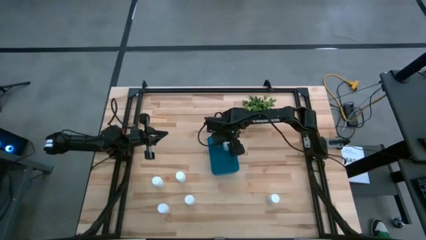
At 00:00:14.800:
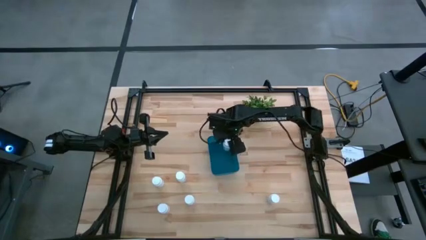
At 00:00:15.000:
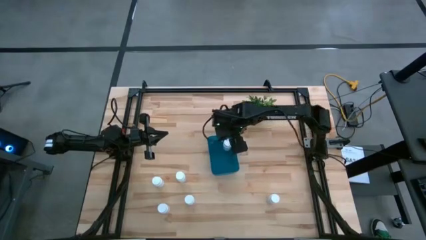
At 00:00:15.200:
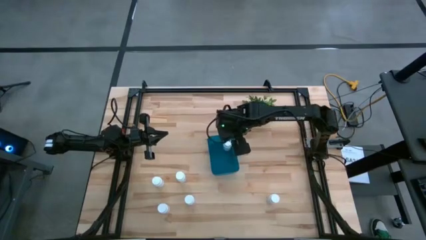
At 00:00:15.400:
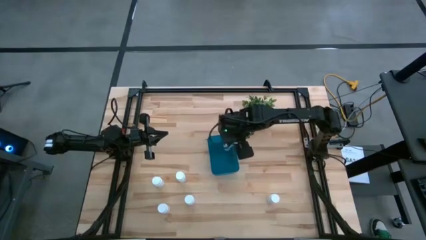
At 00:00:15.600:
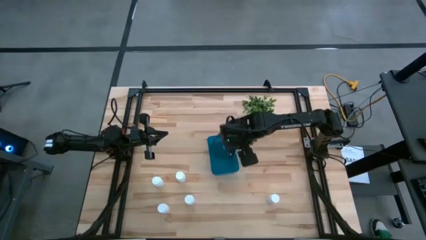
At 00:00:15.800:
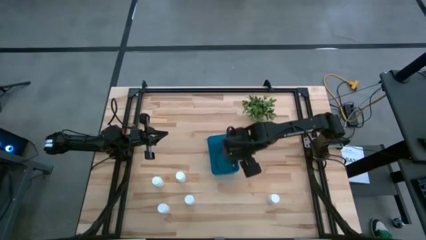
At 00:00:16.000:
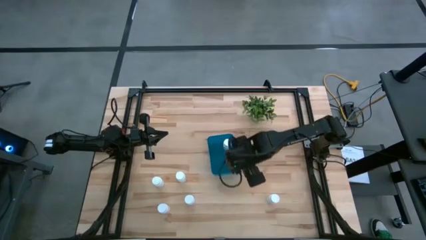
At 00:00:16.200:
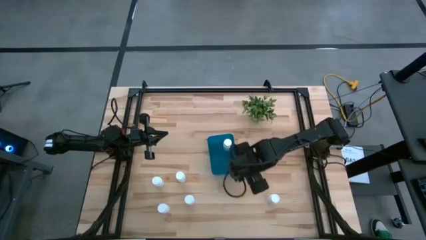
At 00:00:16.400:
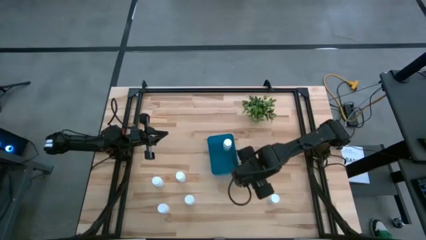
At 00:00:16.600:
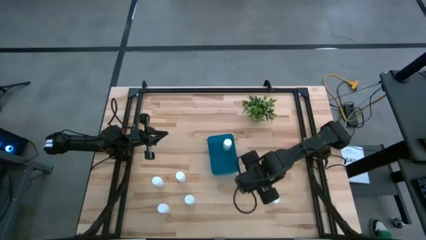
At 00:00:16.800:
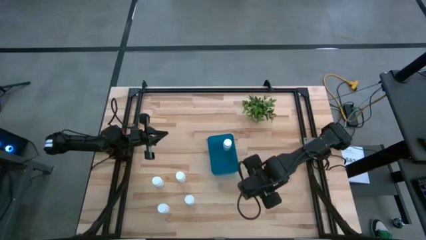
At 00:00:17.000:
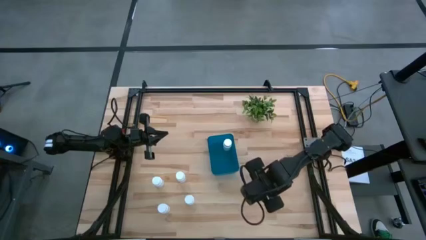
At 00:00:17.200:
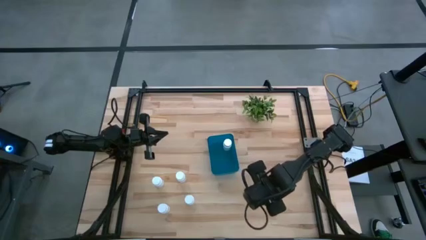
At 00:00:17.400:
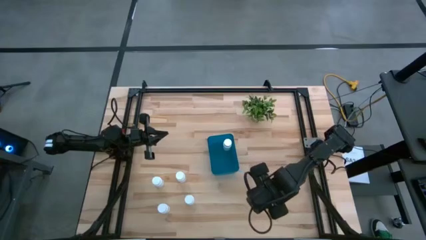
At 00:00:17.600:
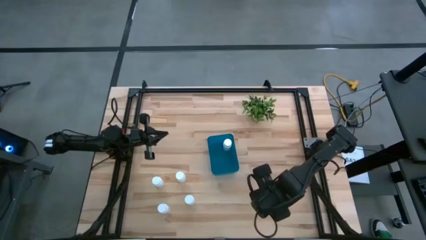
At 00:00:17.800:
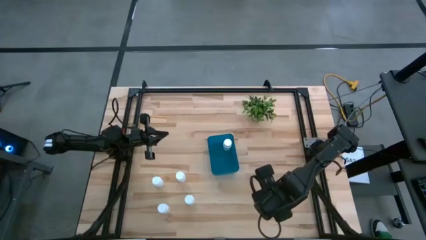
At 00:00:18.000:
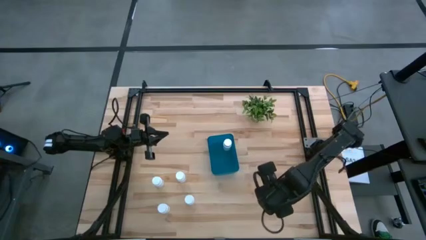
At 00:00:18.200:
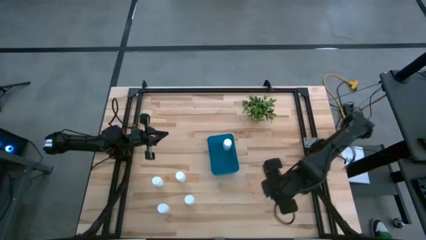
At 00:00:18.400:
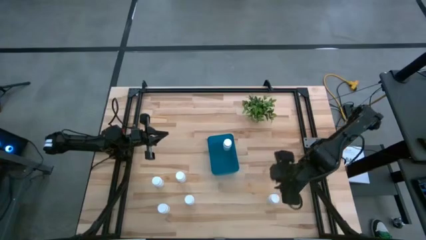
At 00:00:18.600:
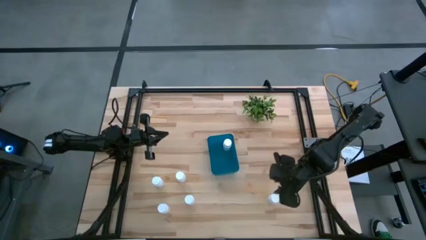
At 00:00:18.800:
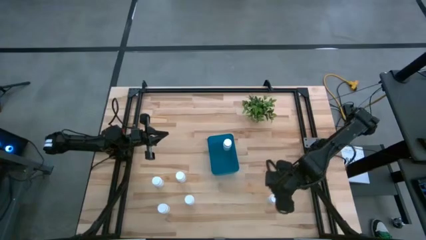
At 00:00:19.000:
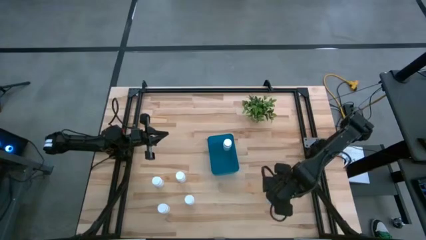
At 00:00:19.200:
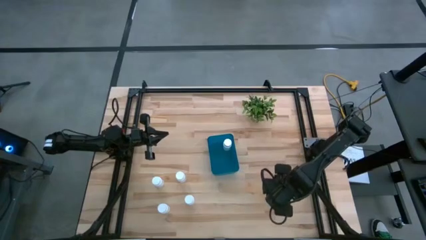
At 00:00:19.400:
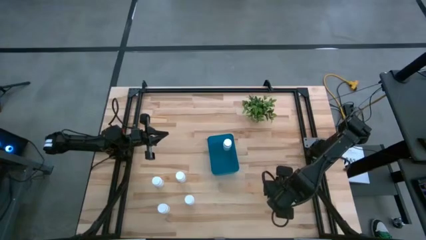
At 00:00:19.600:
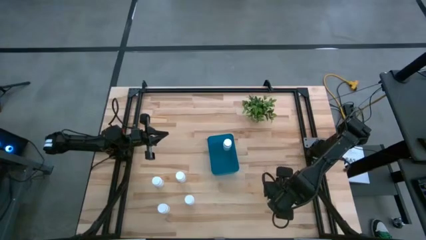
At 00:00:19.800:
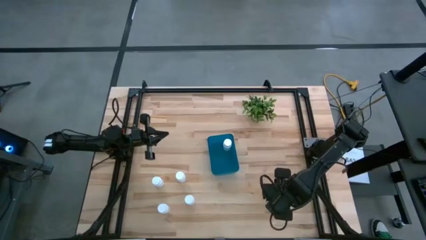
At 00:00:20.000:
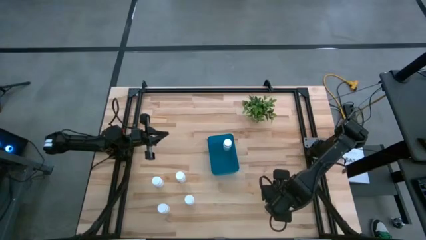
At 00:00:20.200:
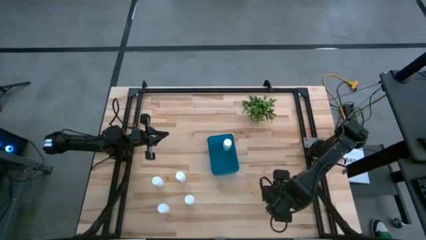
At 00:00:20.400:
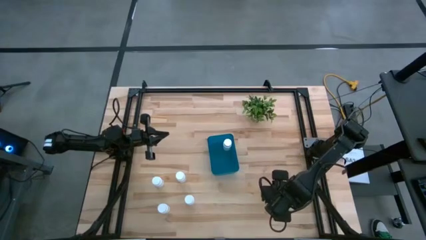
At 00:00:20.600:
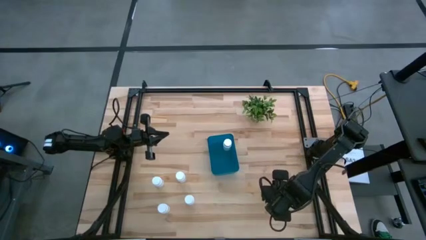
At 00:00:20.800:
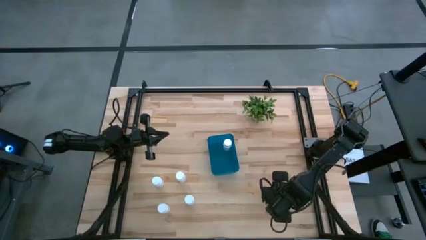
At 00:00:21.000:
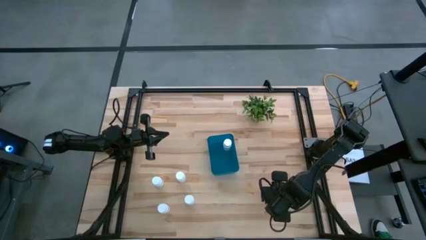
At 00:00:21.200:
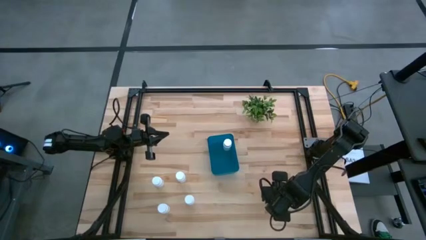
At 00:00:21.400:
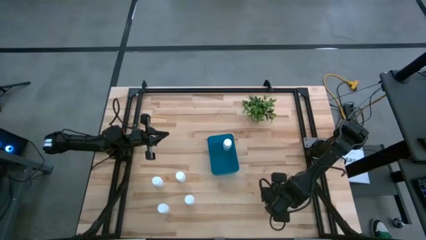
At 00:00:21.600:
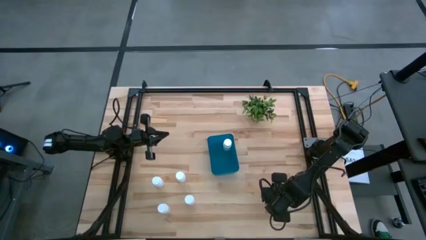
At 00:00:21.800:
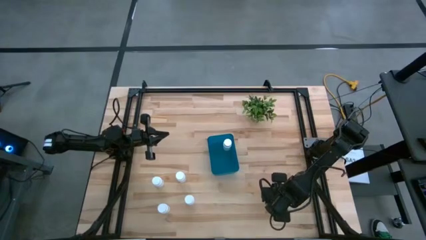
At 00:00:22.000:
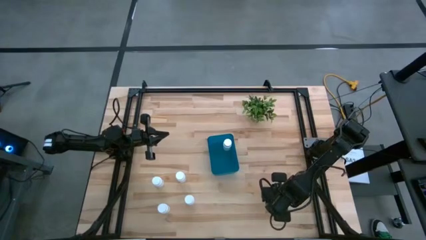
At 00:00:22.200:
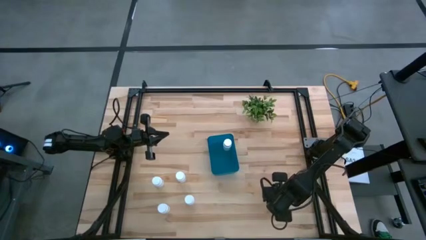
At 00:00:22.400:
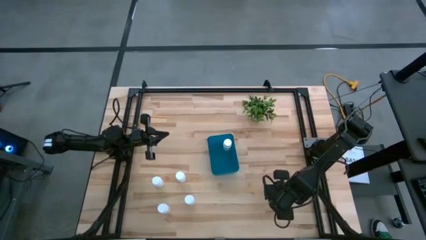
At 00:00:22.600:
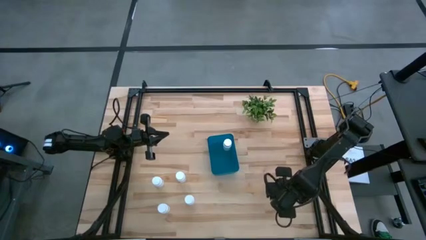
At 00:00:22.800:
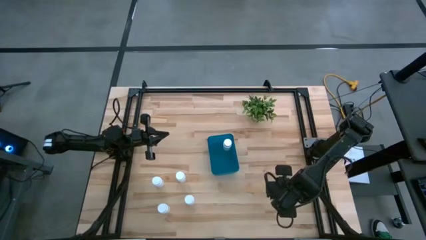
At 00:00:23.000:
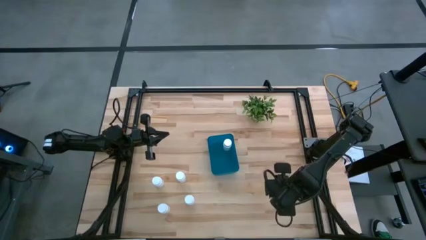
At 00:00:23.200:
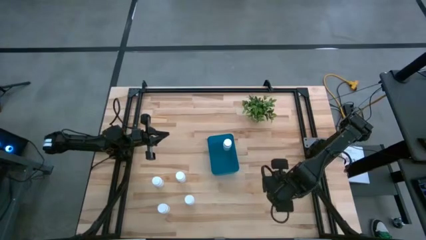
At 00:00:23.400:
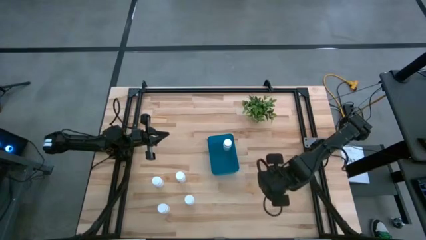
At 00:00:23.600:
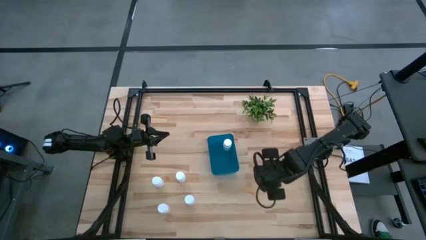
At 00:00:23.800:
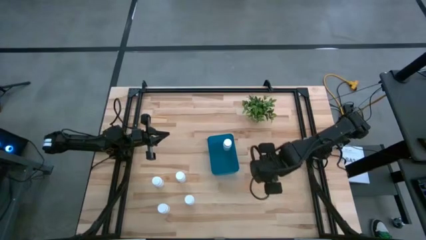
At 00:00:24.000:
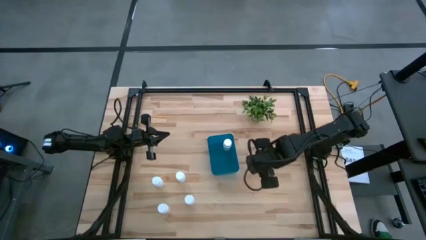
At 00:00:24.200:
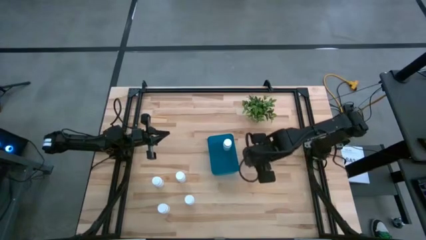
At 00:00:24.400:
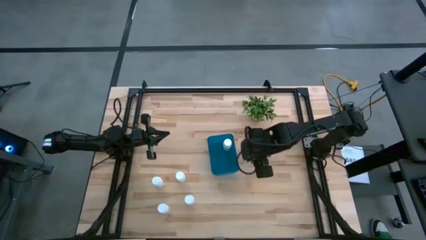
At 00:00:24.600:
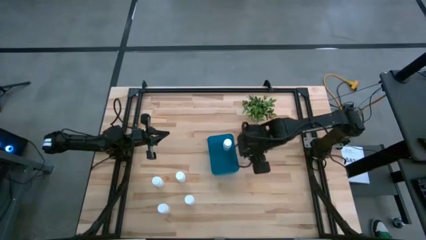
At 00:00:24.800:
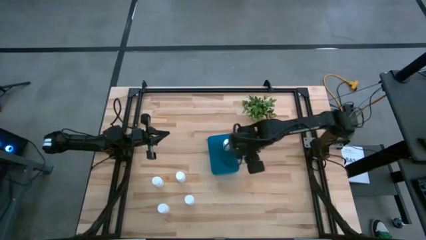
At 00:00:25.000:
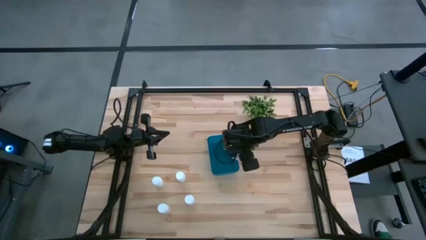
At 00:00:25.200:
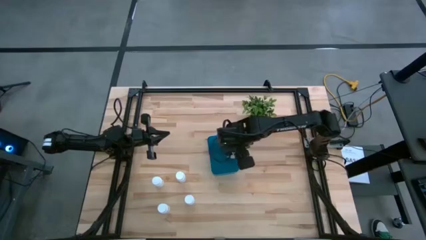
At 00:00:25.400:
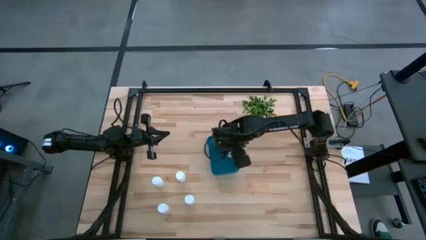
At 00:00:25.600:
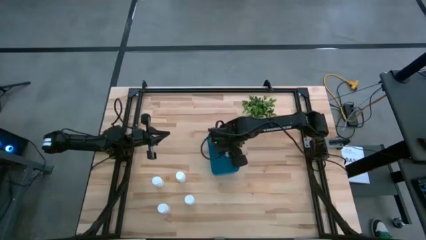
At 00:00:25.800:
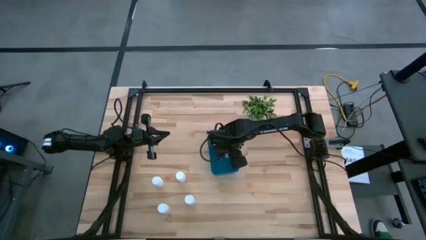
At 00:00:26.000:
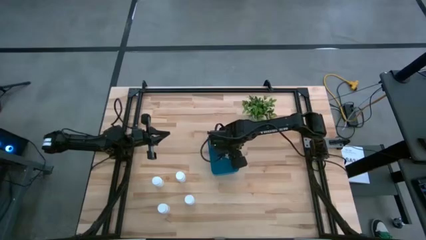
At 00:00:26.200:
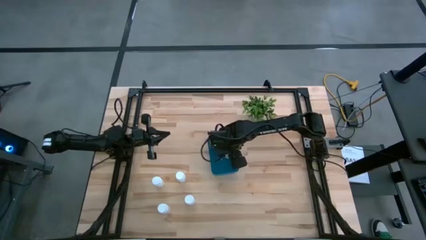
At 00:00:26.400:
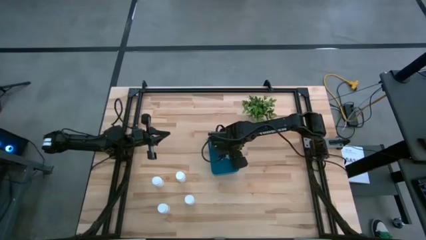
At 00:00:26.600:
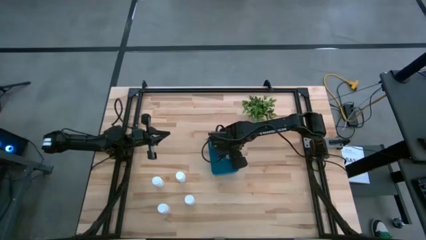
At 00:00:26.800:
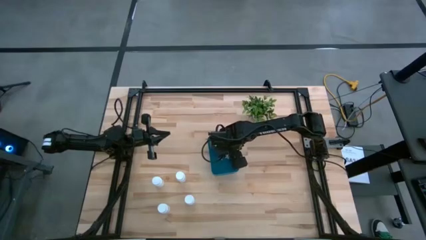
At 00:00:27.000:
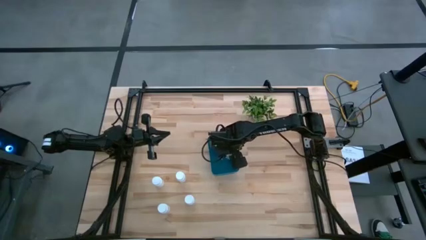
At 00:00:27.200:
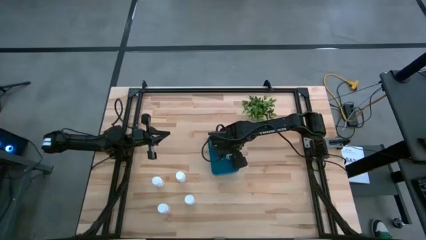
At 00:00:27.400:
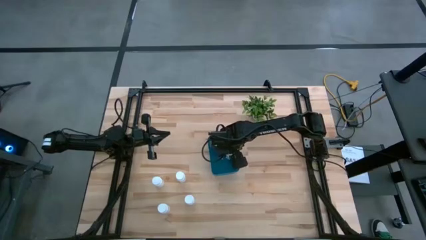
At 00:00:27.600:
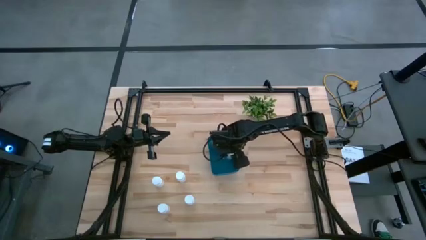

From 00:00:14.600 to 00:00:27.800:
Task: Pick and place pill bottles into a basket
Put the white pill bottle into the blue bin

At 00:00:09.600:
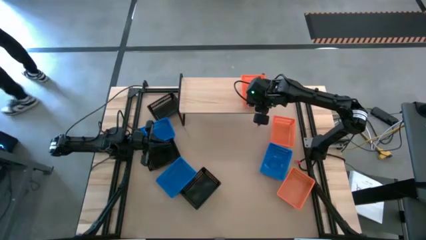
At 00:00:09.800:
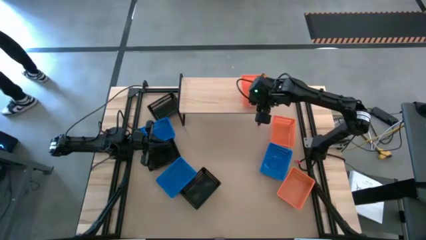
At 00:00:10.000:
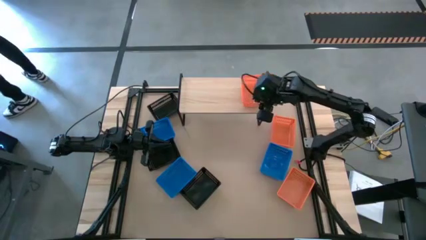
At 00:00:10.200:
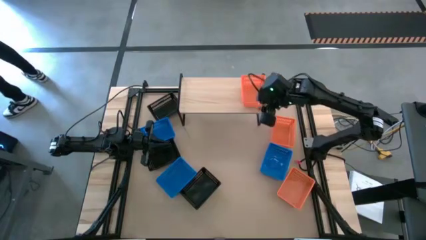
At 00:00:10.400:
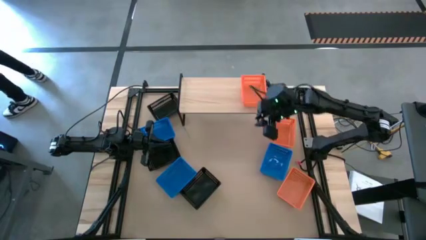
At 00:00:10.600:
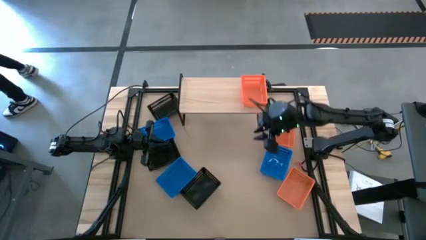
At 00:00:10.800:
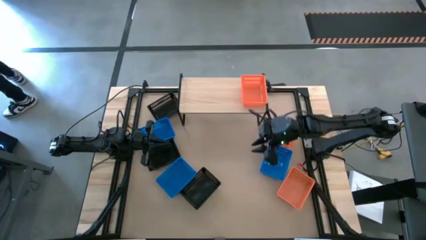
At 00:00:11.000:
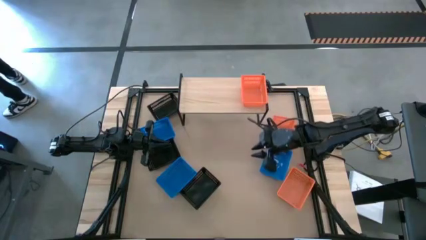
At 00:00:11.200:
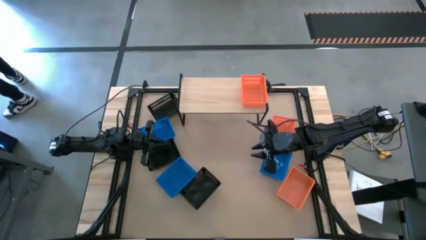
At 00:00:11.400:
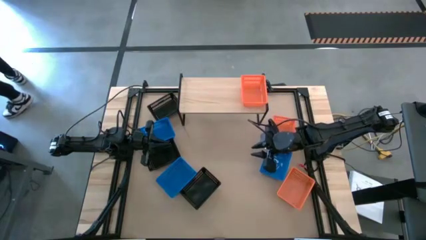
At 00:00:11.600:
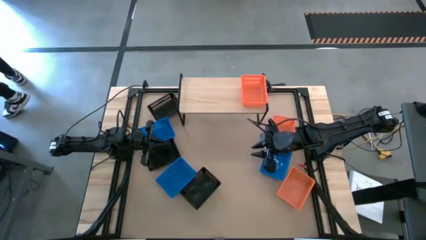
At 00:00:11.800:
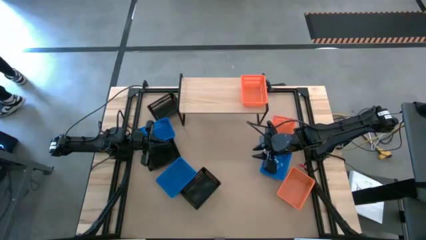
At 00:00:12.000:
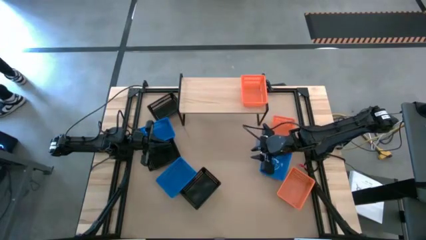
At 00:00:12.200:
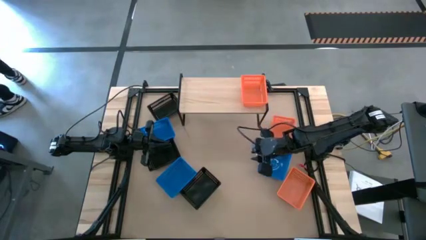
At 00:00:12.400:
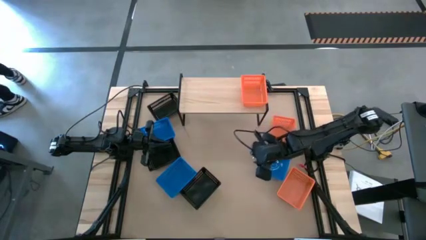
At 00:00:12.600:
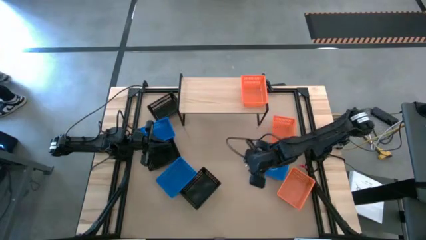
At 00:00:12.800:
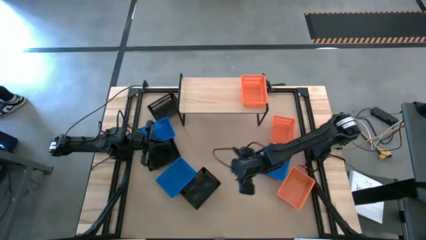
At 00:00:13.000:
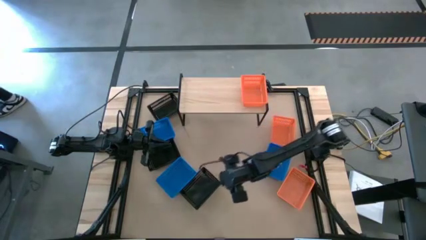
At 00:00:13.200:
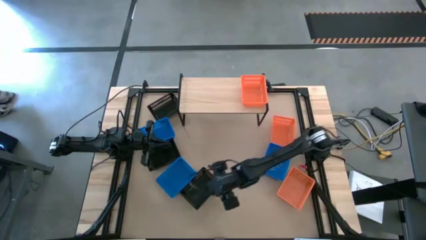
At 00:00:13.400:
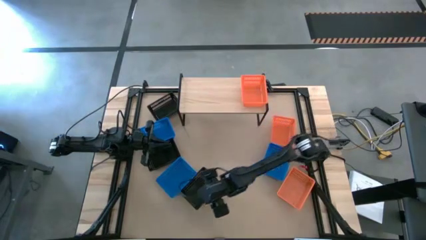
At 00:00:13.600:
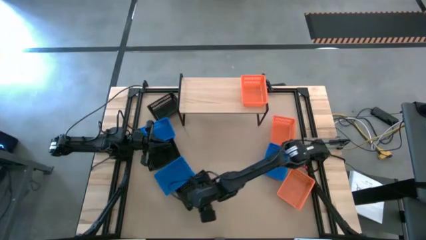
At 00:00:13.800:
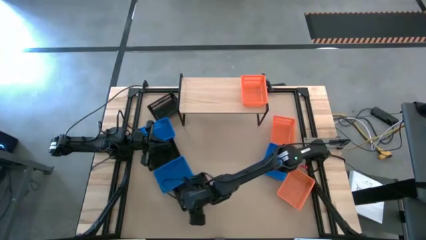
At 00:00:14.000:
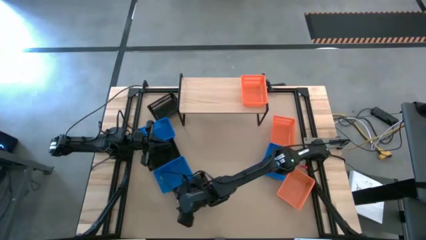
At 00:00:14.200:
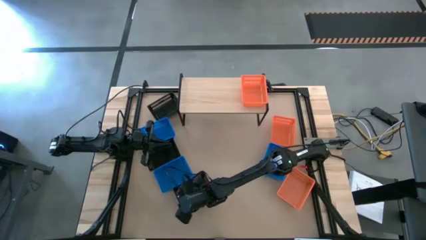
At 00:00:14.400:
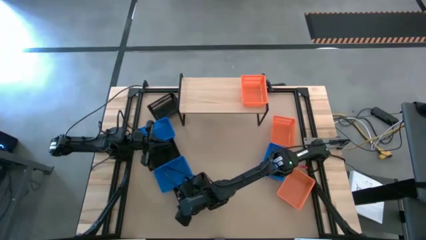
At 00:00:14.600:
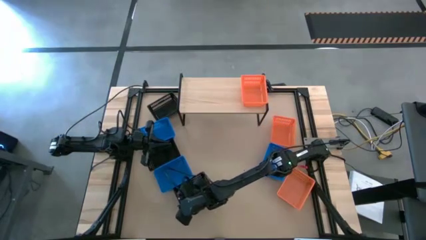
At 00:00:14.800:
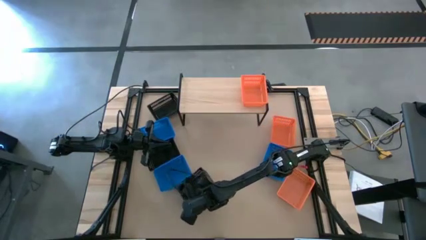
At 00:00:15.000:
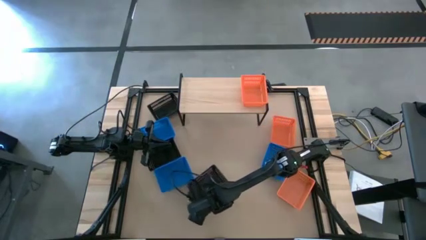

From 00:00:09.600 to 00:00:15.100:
Task: Stack baskets on shelf by color
Put the bottom black basket on the shelf
